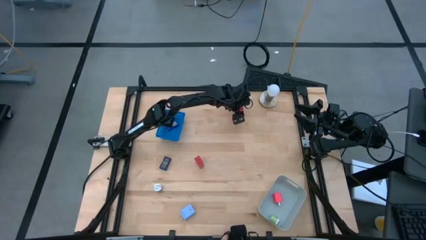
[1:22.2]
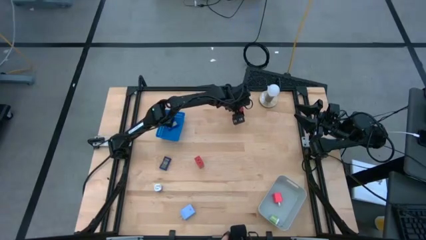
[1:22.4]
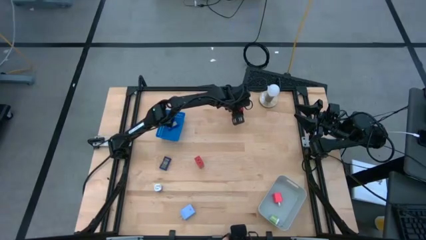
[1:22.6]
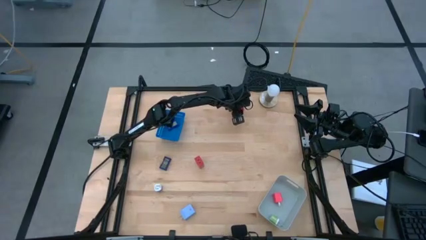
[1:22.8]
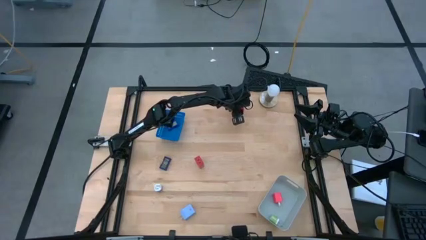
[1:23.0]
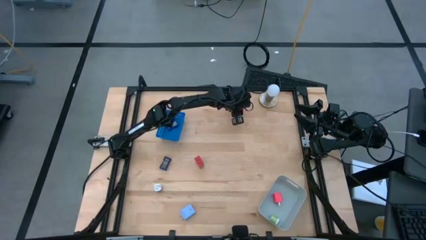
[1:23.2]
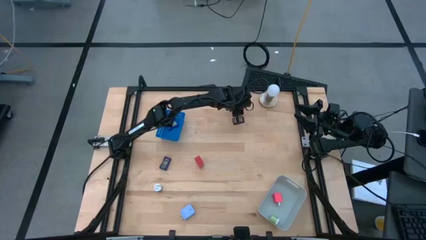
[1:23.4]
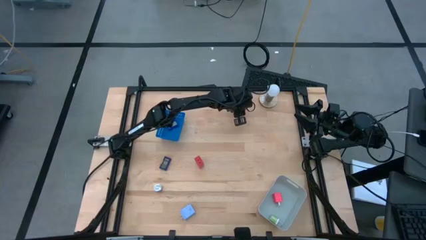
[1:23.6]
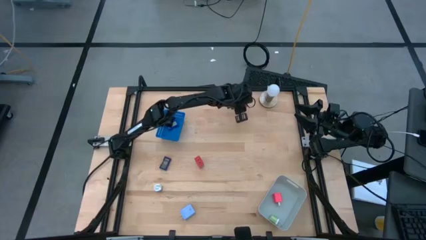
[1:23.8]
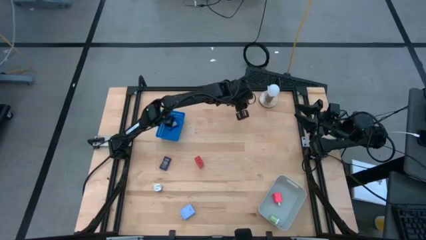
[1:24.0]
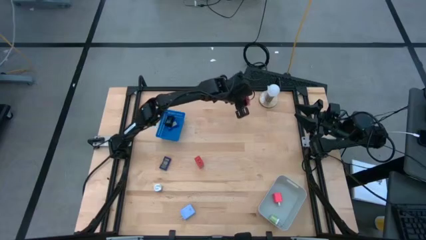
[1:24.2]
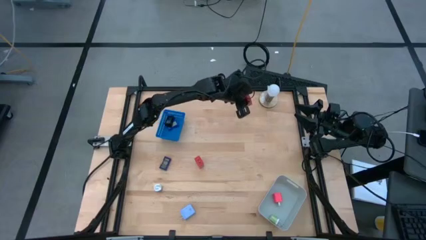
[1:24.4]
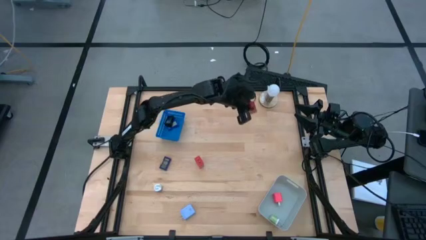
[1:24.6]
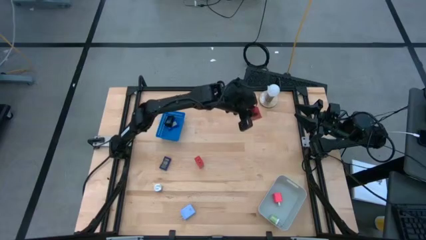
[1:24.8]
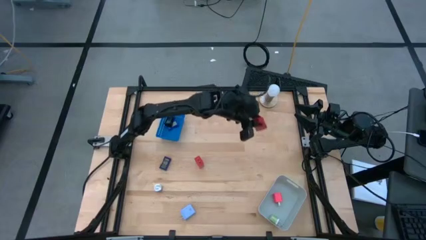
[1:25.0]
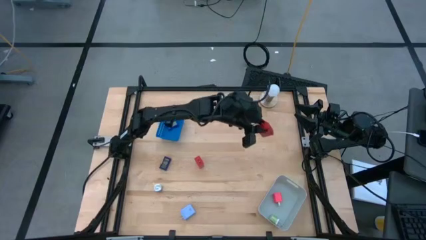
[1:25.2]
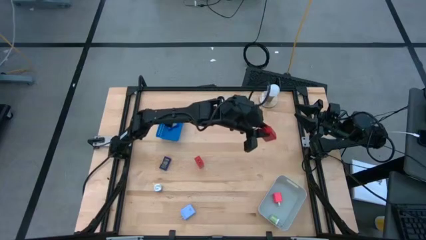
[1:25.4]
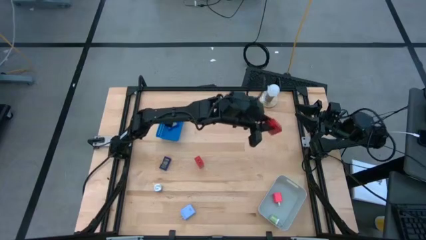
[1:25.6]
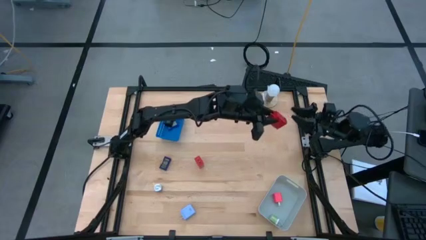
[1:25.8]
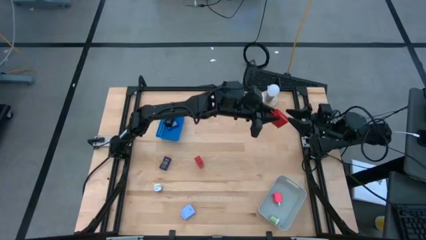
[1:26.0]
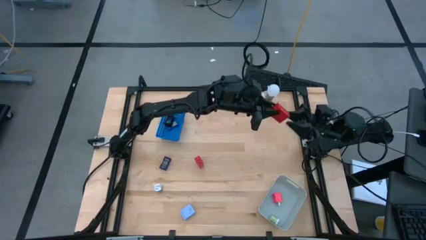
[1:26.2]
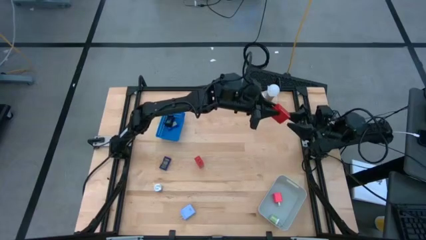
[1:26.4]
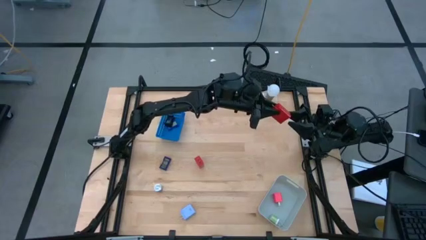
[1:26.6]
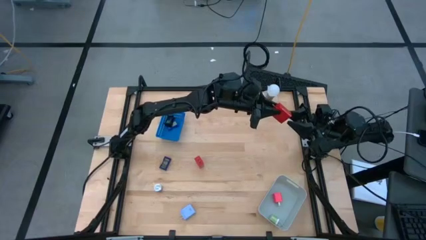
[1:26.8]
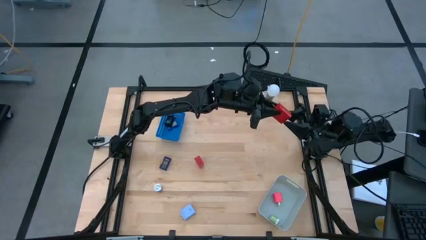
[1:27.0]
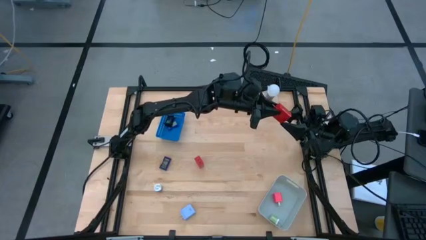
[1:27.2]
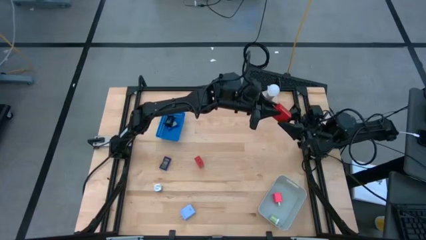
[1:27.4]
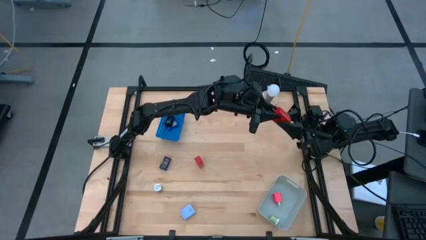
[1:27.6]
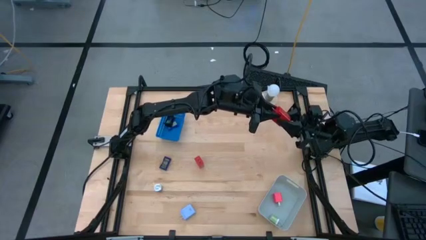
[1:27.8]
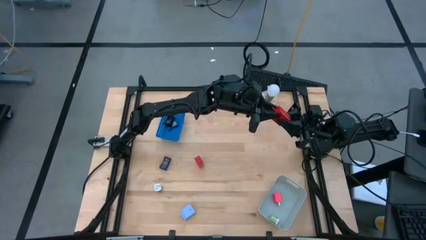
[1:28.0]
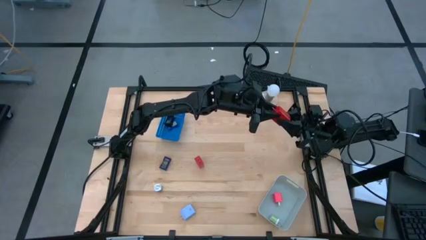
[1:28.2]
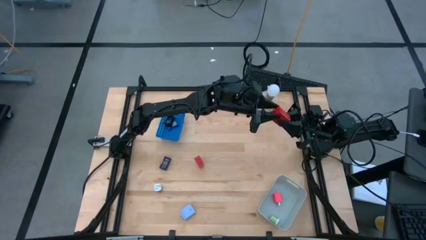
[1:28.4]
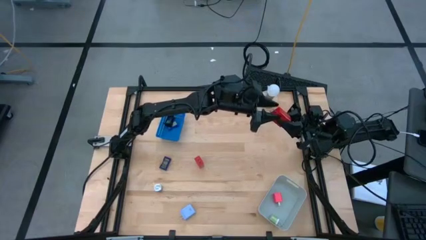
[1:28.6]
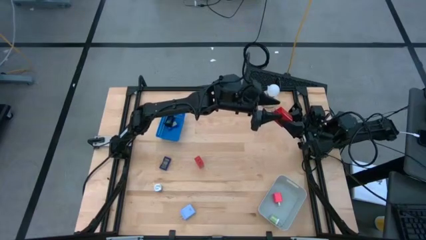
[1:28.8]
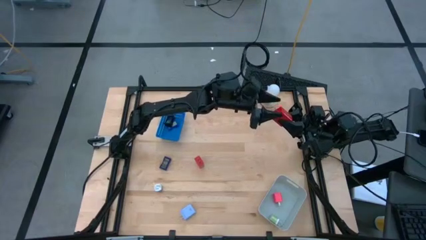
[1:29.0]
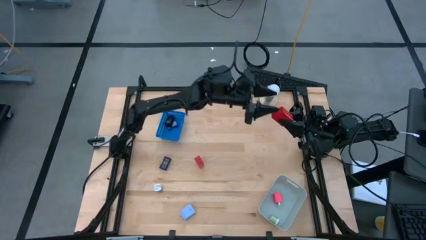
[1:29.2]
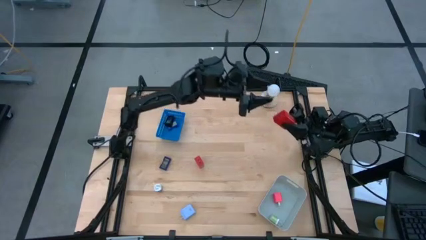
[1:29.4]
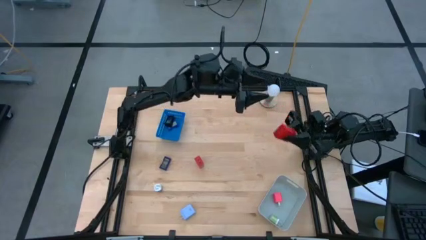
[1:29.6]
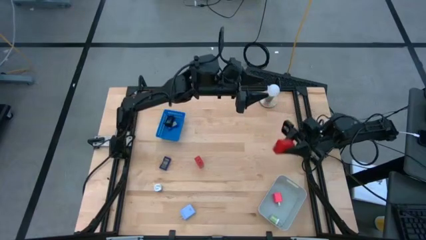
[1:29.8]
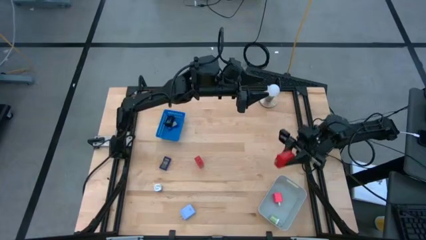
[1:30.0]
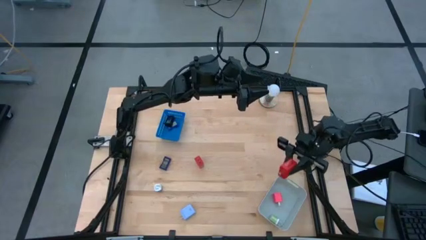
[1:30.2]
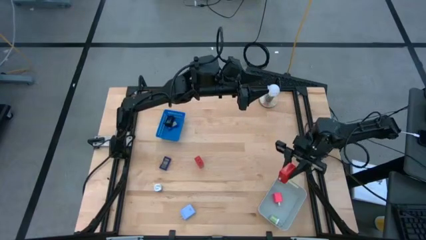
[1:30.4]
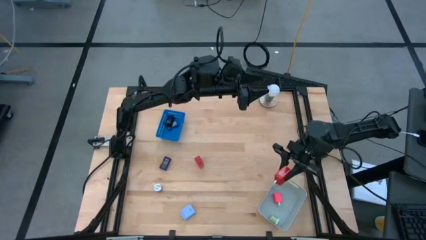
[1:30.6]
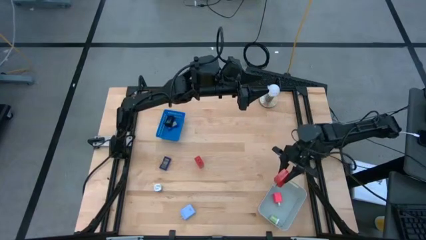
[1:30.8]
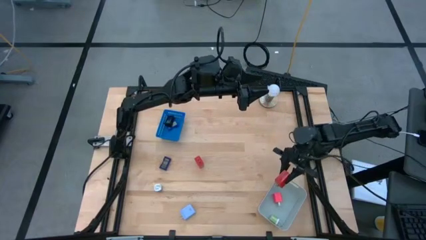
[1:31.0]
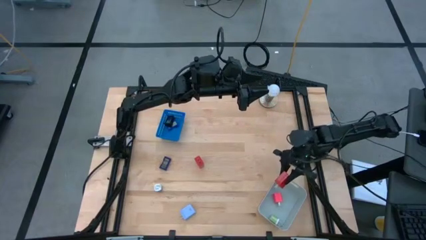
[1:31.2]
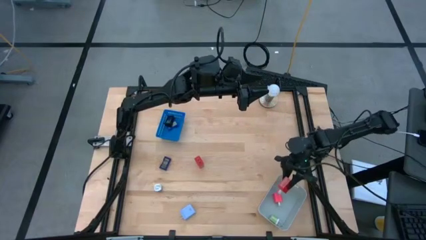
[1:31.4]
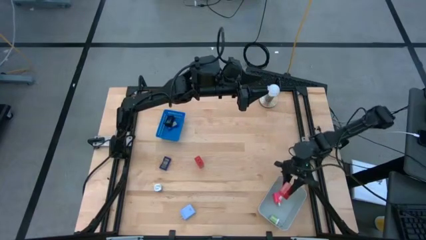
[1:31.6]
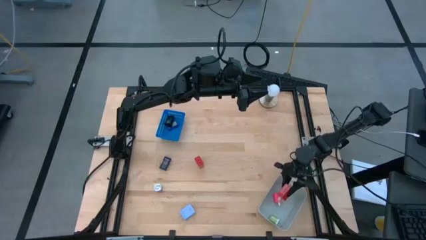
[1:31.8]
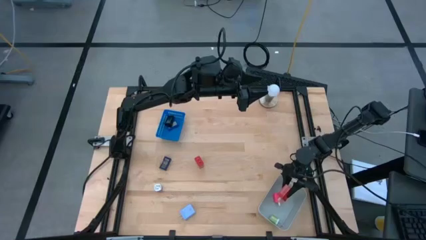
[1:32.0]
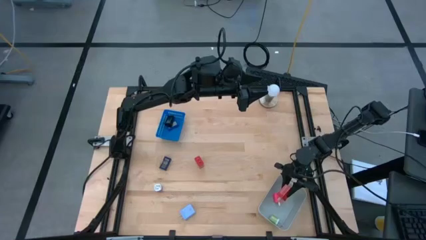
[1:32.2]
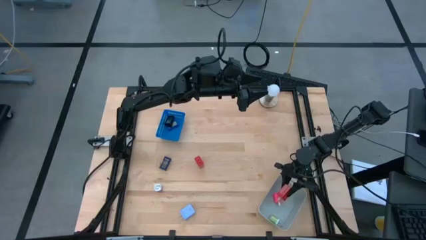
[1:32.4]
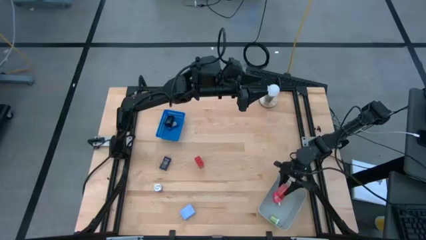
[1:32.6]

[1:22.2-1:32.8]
Task: Pick & Place Office items
Put the top red charger adapter into the white bin
